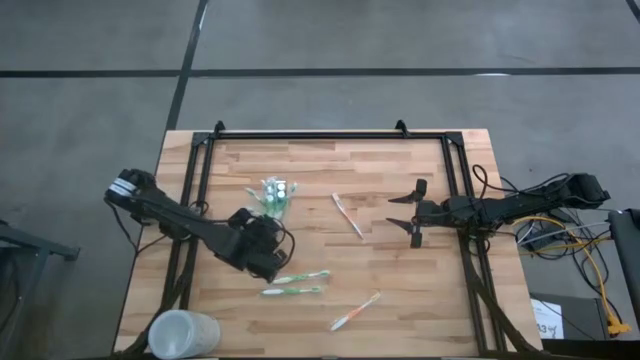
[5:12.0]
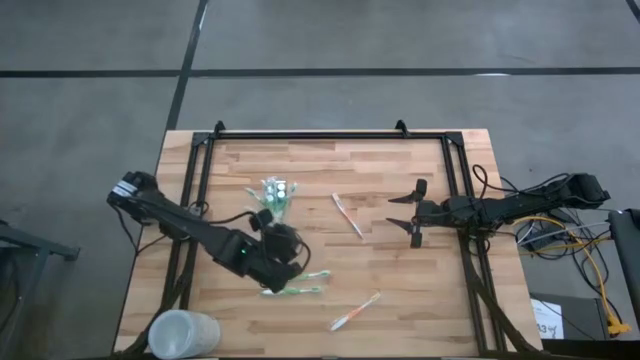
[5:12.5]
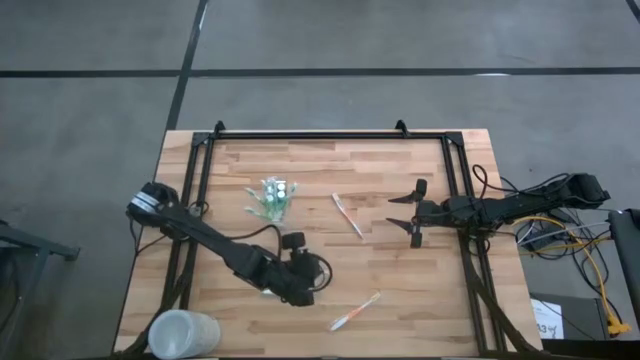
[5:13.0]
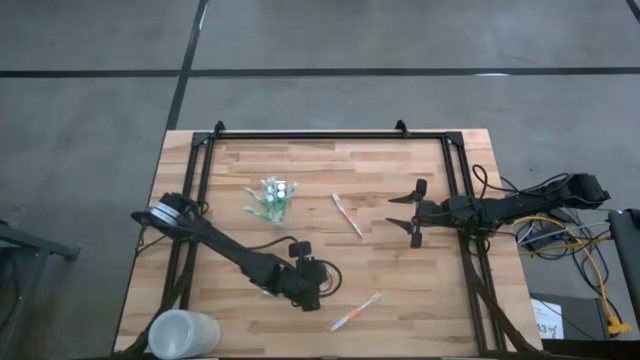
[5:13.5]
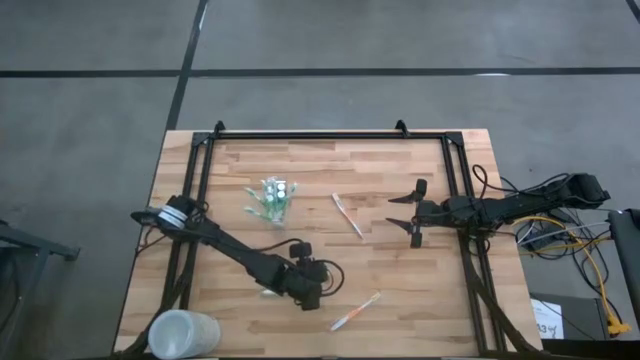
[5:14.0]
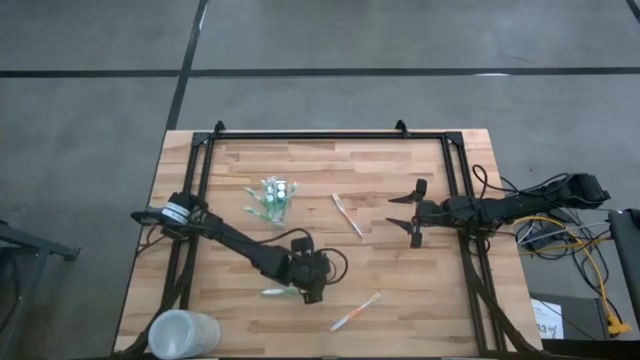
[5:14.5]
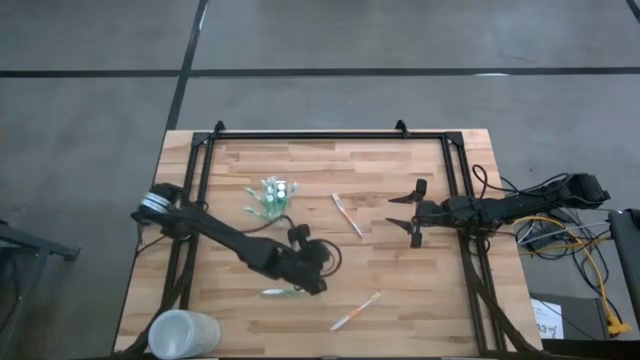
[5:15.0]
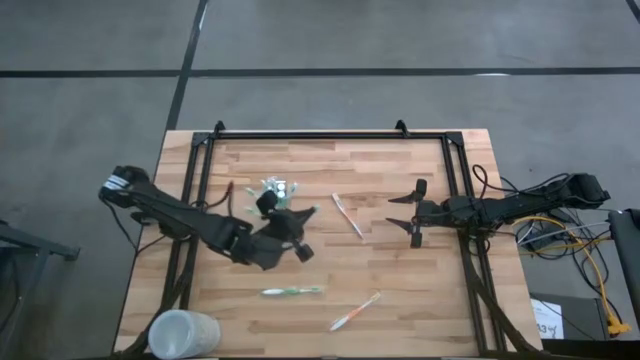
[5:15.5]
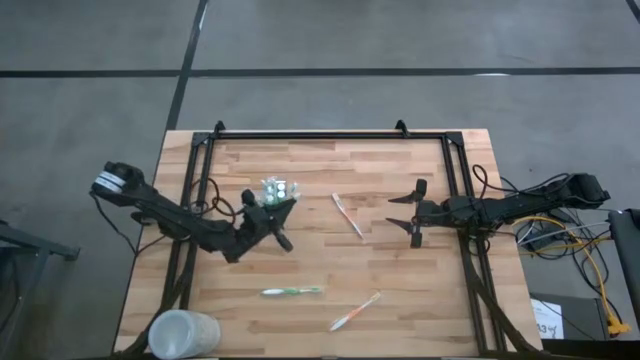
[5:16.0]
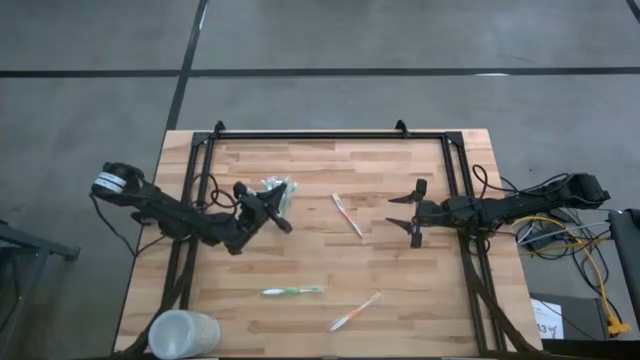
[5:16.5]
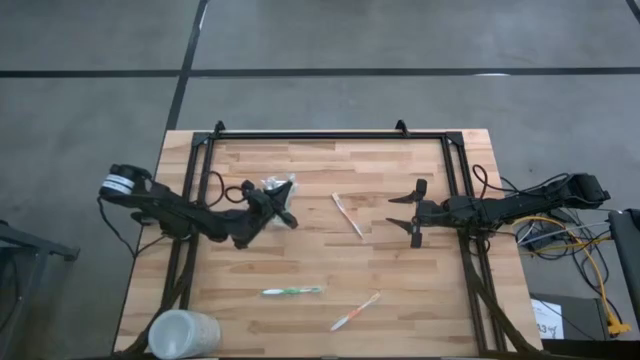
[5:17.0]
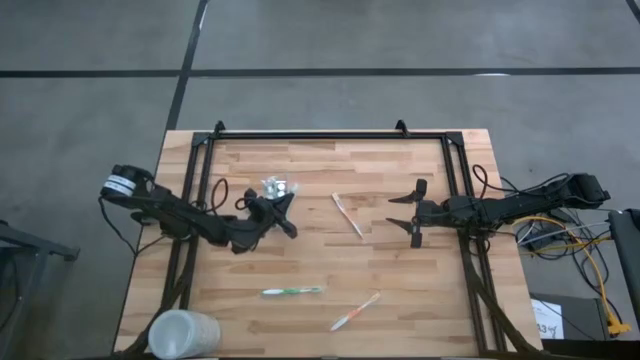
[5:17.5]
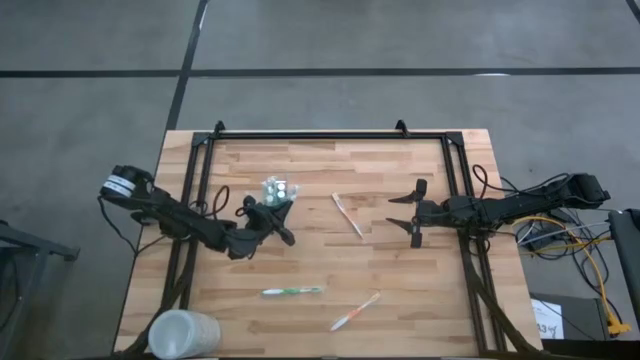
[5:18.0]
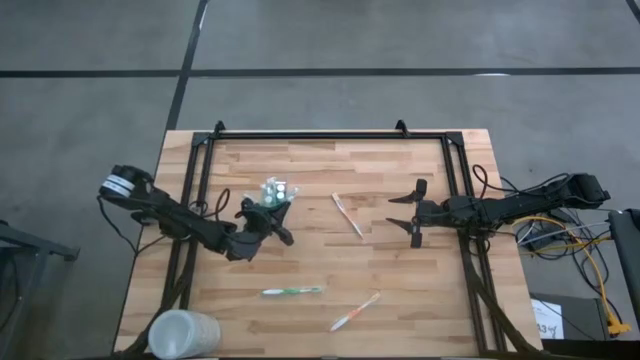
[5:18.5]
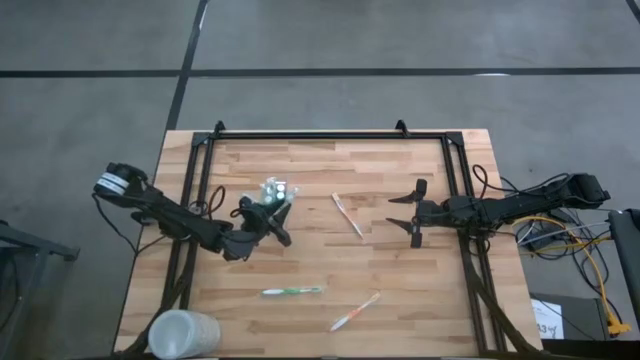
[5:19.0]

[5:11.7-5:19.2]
Task: Pick & Place toothbrushing station
Put the green toothbrush into the transparent organizer

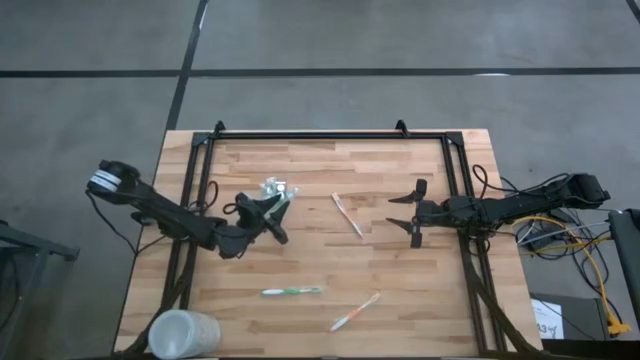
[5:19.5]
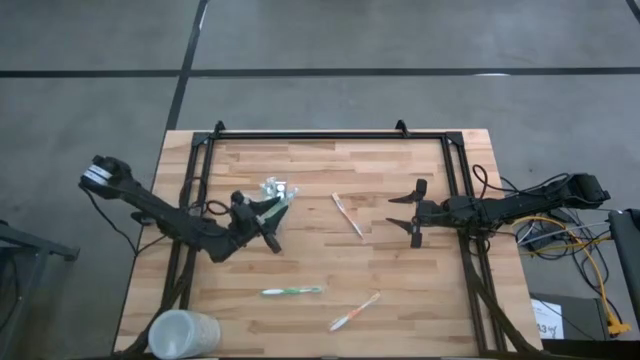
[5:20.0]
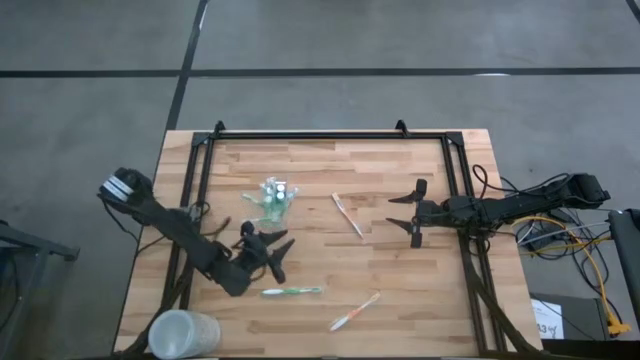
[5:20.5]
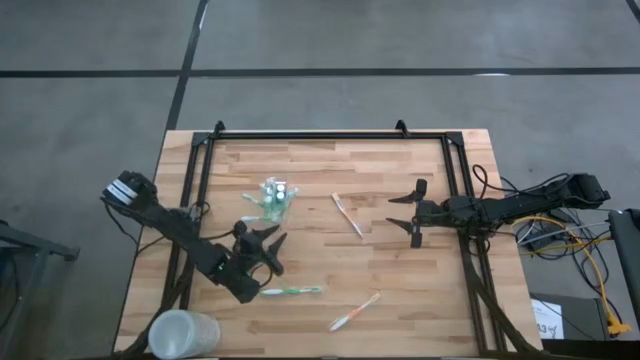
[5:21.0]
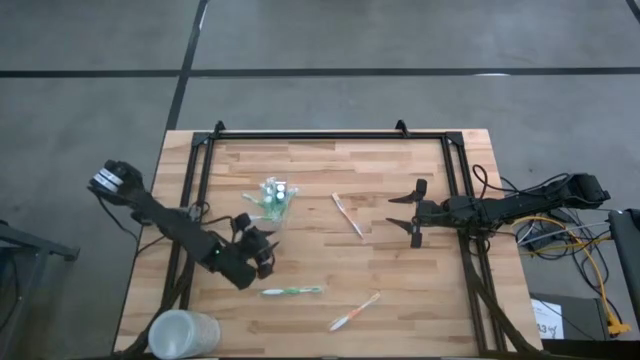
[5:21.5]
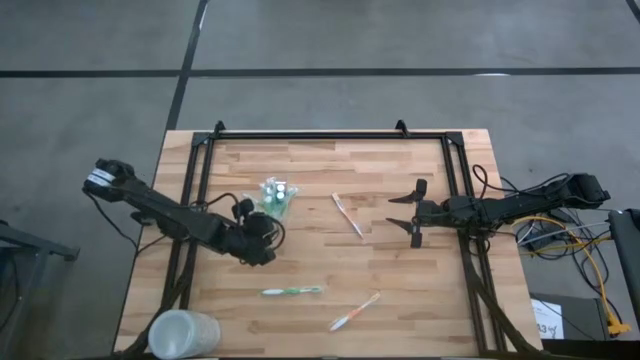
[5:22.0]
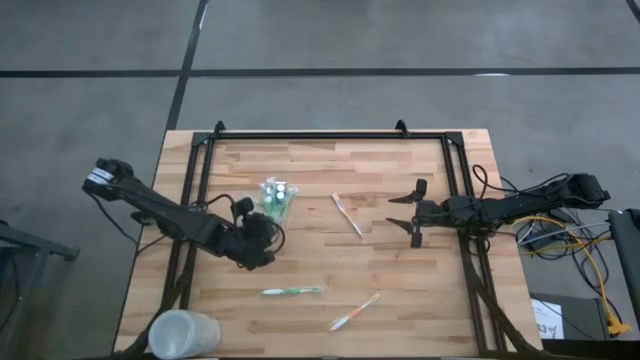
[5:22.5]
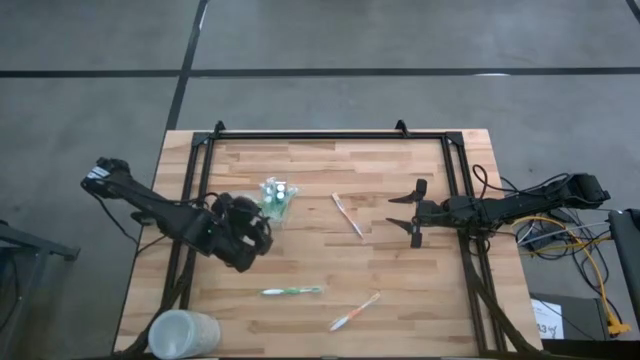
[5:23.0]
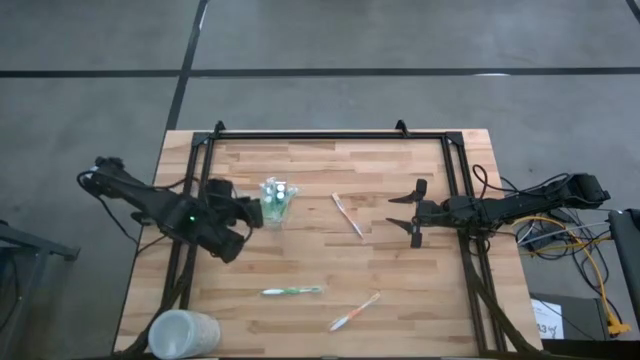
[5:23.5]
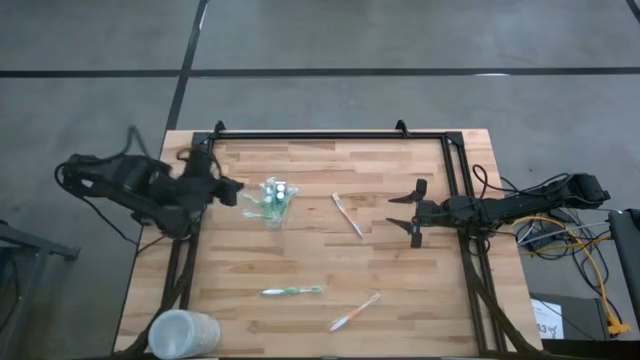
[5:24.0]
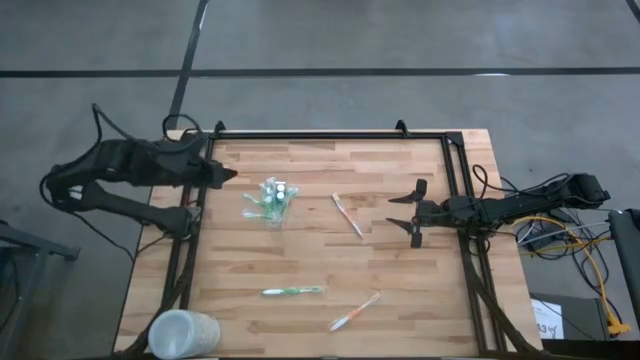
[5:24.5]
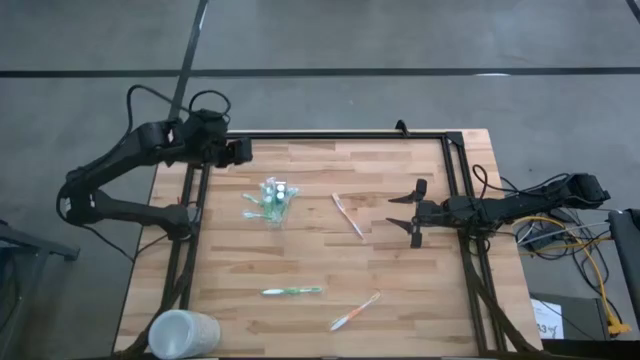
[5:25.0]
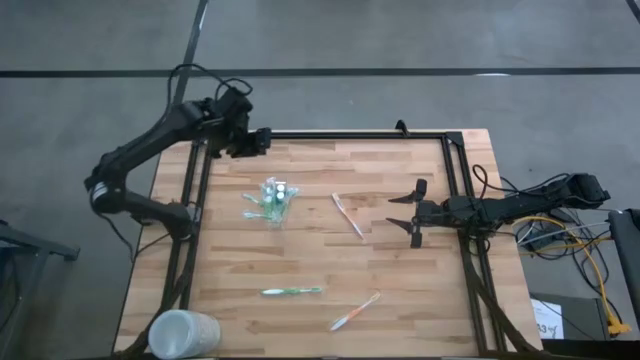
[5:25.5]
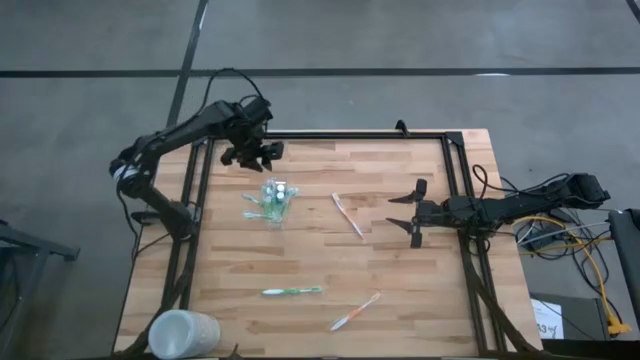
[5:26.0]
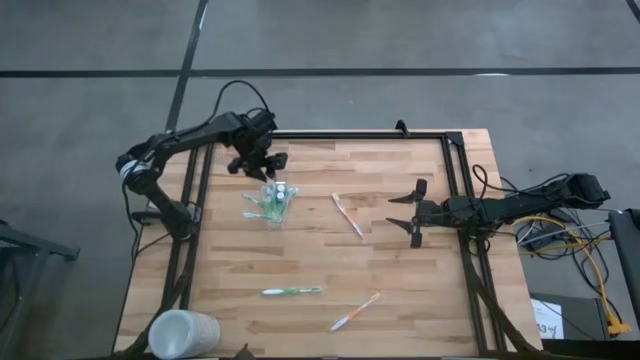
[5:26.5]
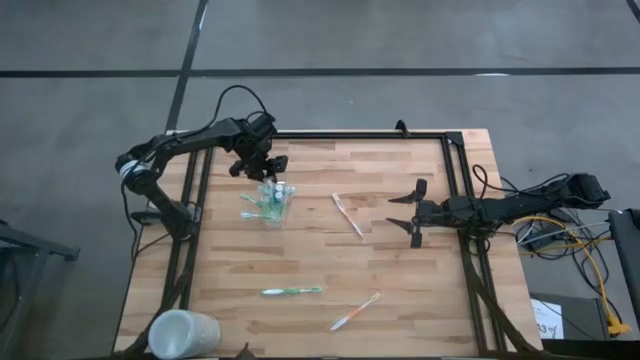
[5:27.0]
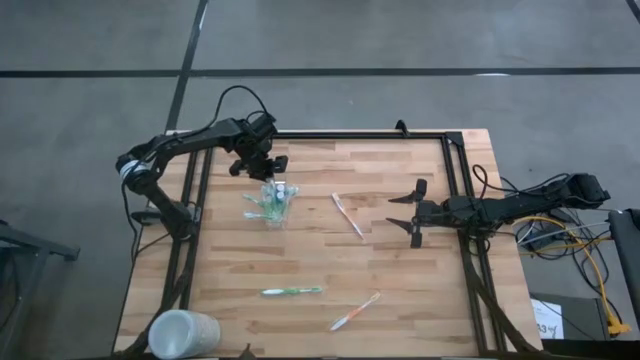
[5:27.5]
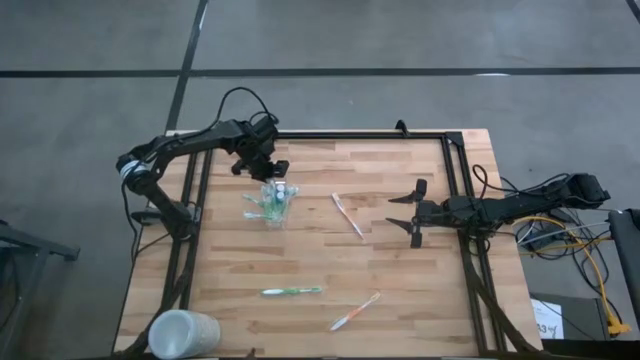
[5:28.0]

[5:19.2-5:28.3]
Adjust the transparent organizer on the table

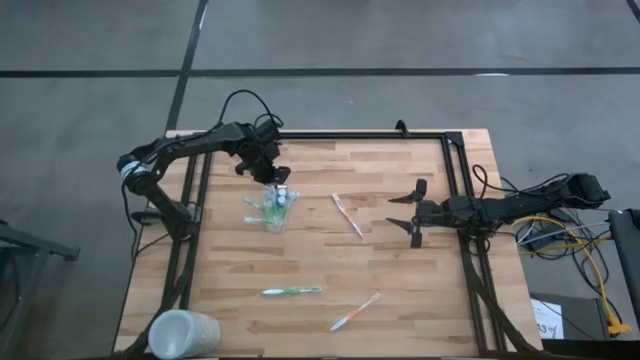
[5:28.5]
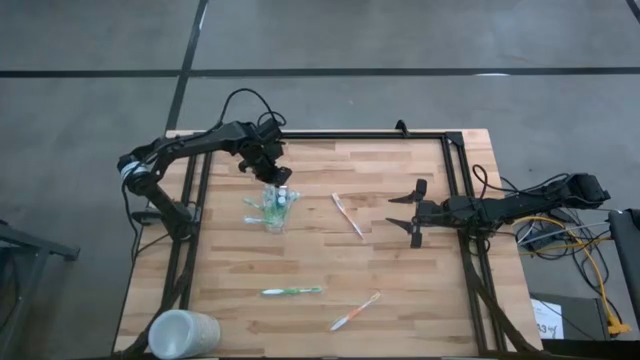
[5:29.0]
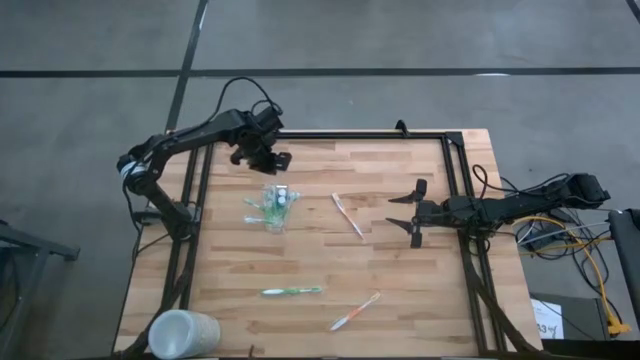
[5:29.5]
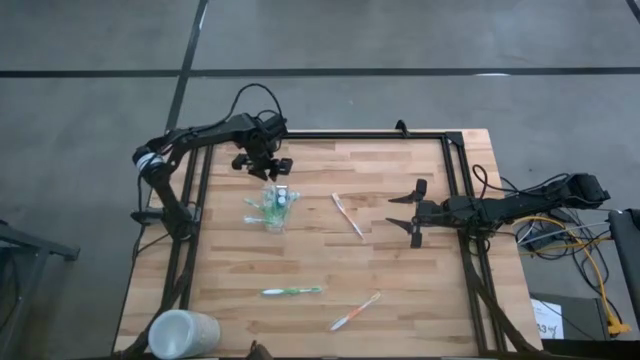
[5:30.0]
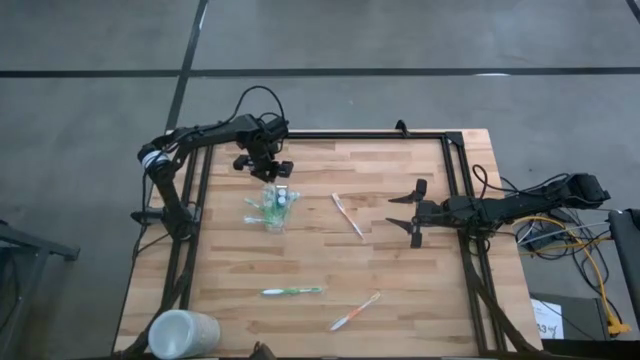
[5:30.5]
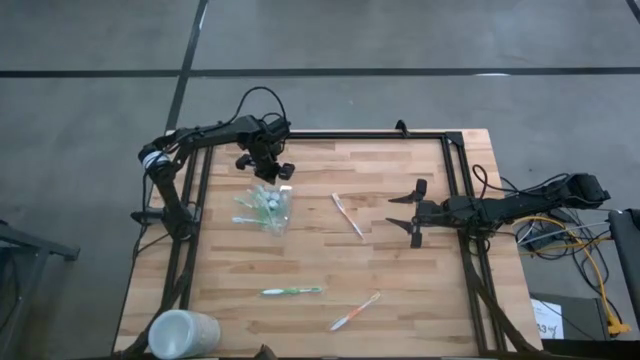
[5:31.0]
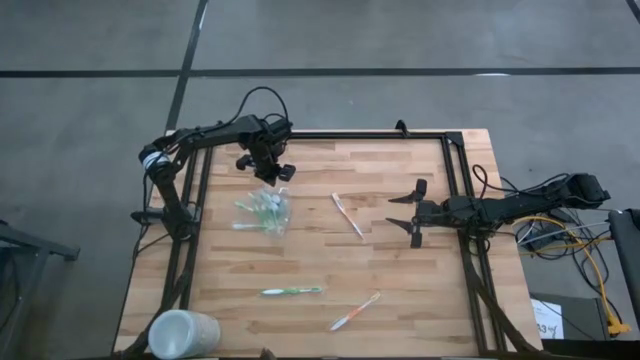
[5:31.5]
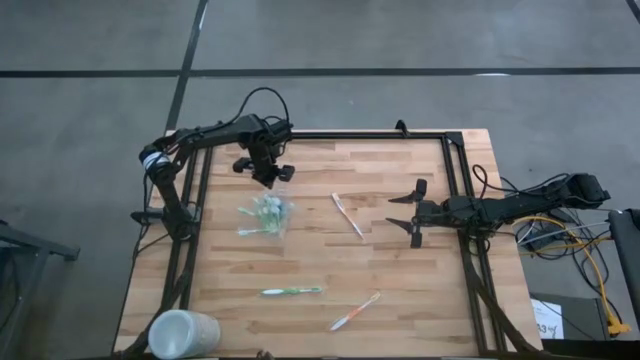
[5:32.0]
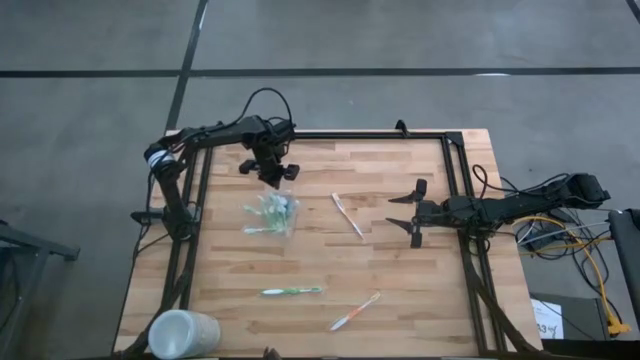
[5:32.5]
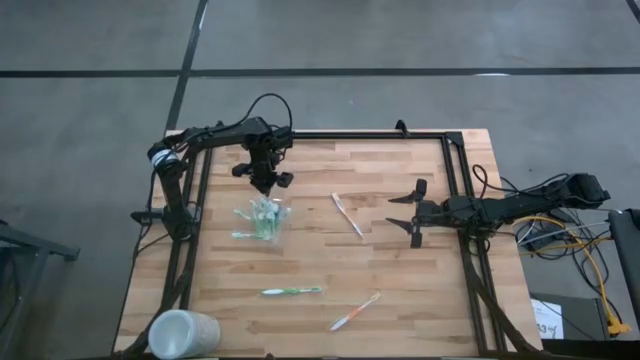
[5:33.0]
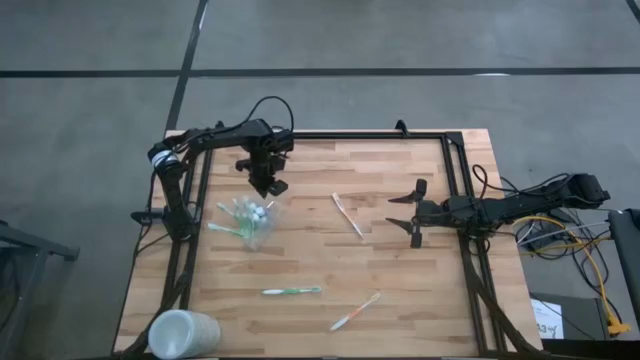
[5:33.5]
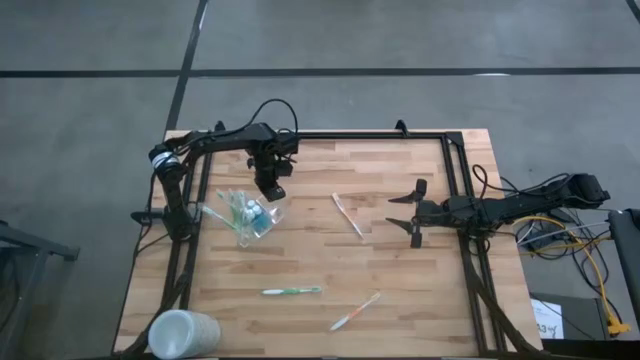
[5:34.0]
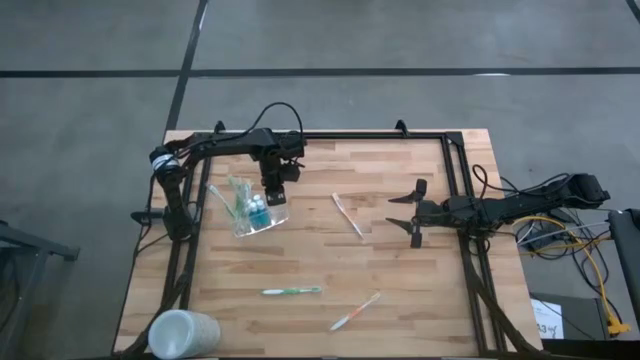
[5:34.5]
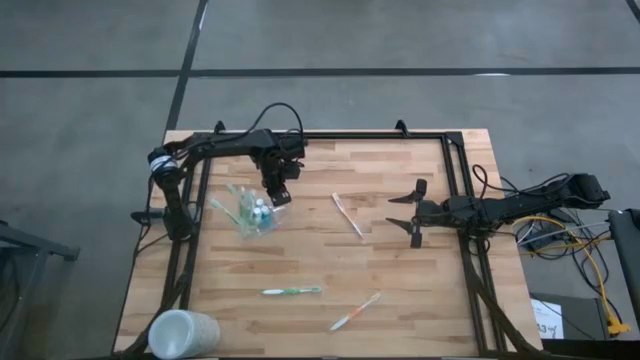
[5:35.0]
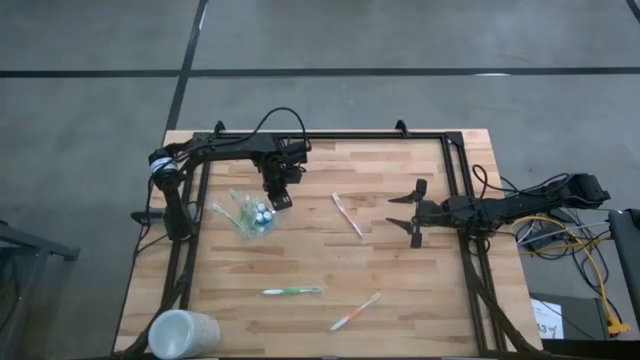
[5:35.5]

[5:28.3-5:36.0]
Adjust the transparent organizer on the table
